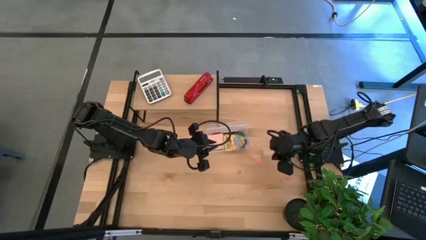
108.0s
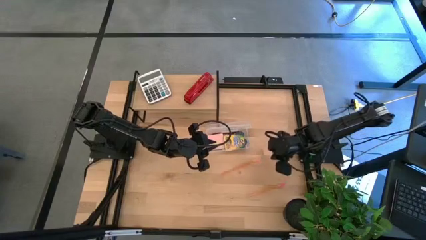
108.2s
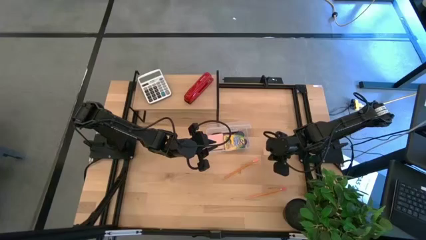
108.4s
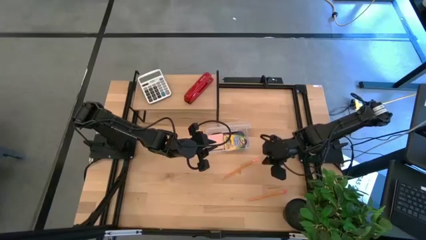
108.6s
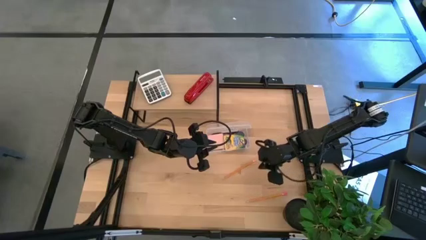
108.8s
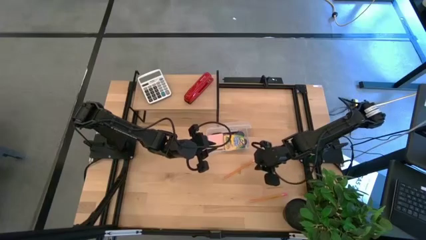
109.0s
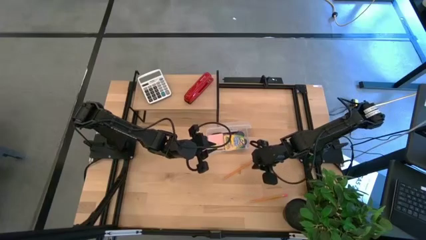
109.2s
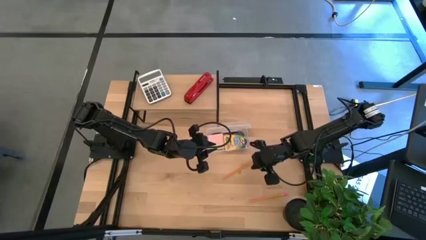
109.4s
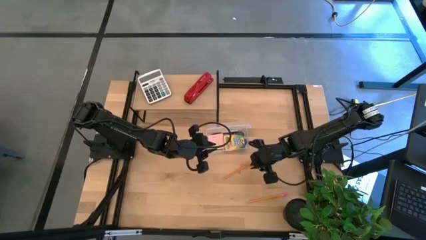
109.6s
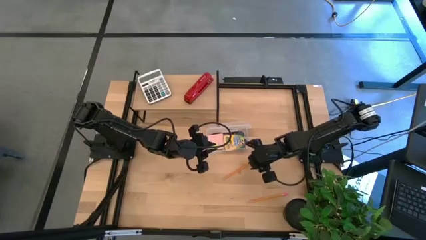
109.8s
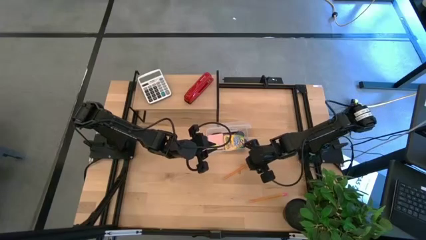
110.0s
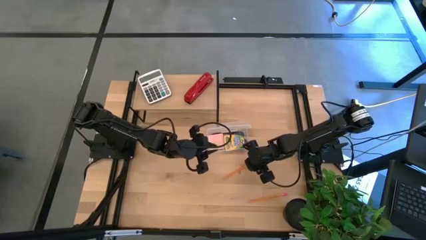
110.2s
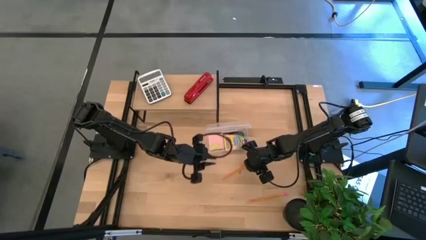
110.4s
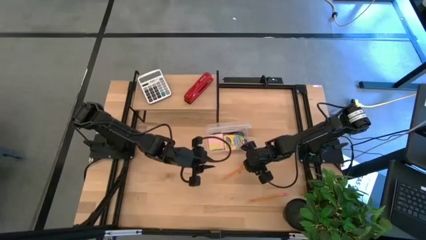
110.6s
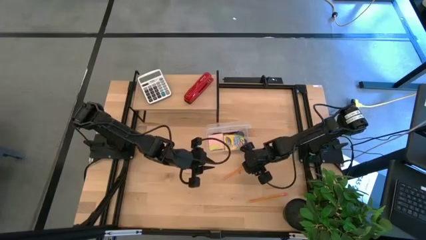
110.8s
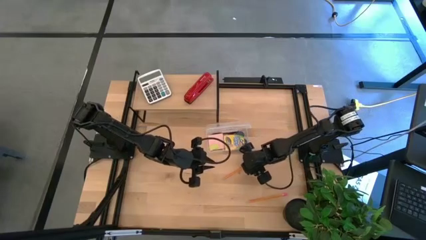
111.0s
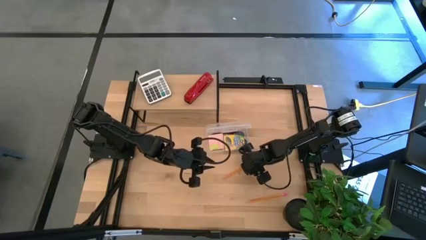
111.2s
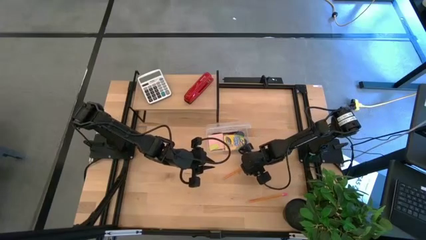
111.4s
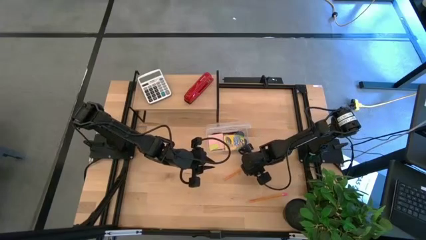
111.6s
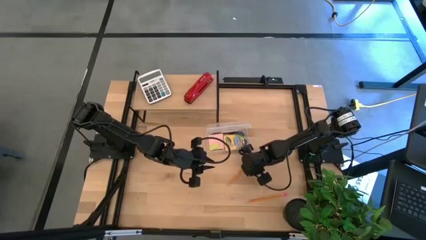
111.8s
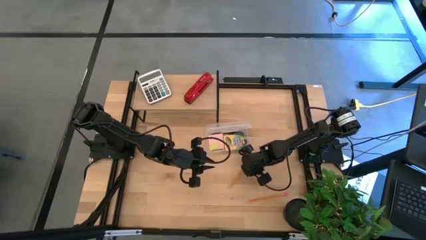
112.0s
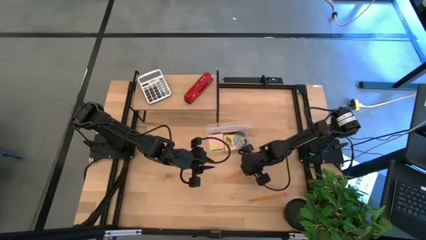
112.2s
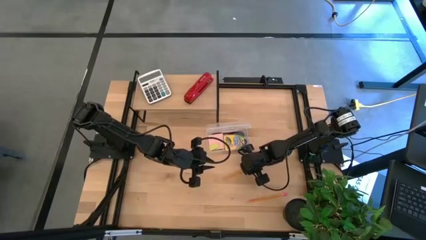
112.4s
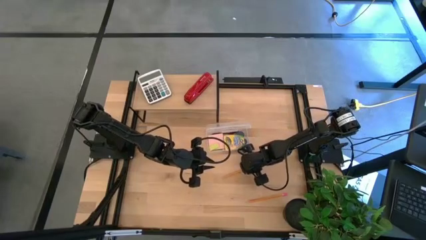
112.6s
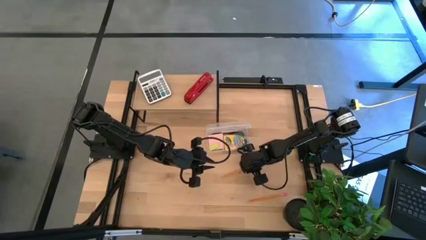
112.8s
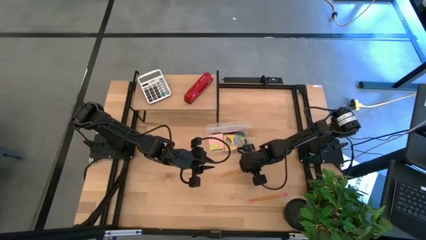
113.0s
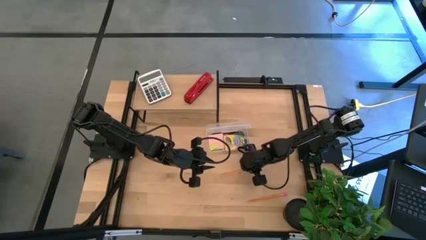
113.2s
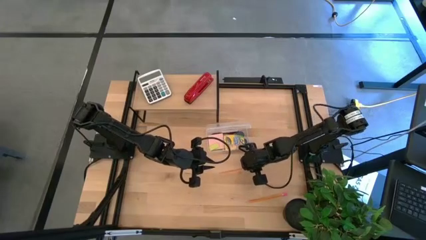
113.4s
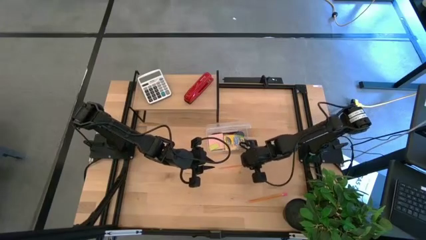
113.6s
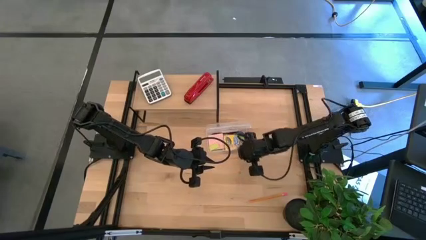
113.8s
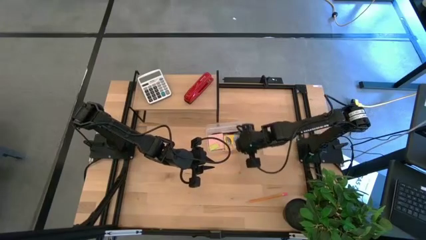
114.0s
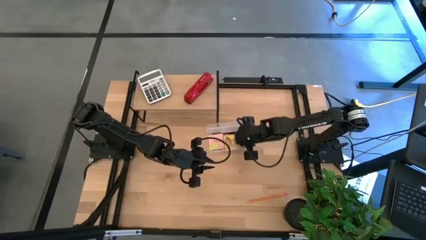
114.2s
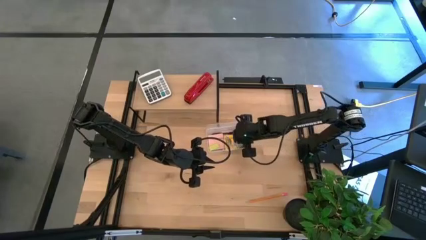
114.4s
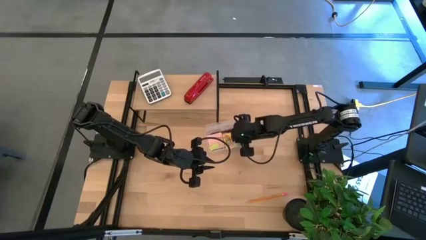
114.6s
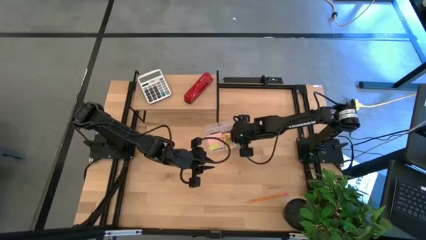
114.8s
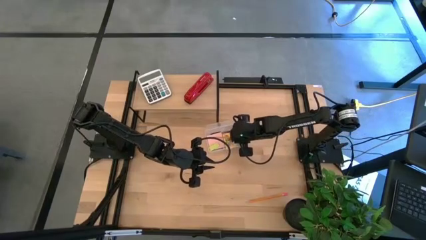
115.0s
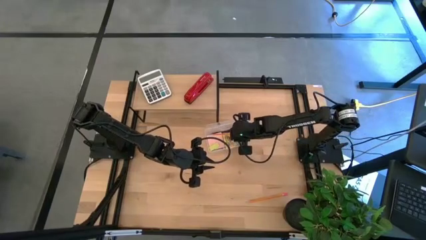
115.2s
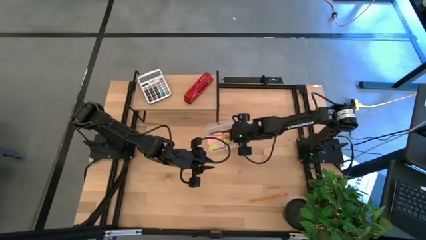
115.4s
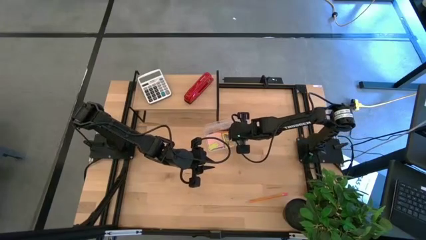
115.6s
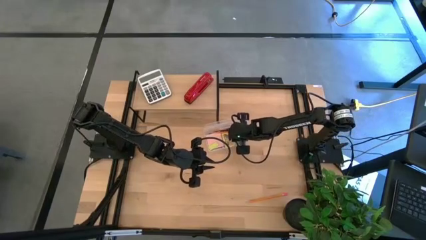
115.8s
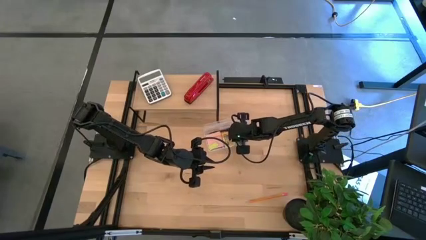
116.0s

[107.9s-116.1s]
Task: Pack school essentials
Put the top orange pencil into the supply box

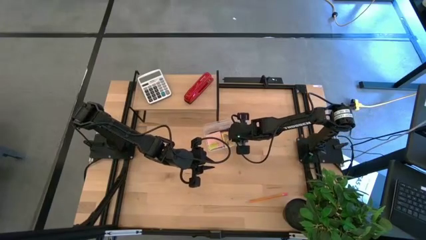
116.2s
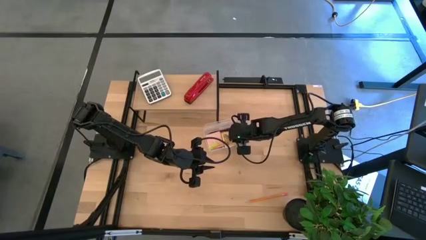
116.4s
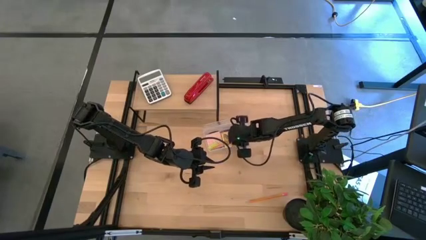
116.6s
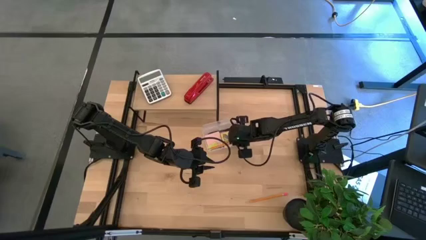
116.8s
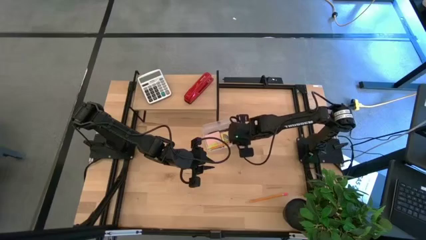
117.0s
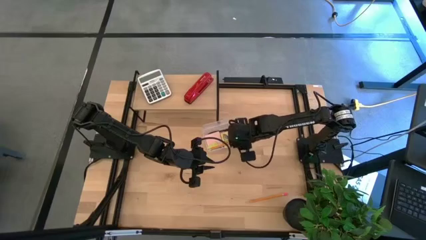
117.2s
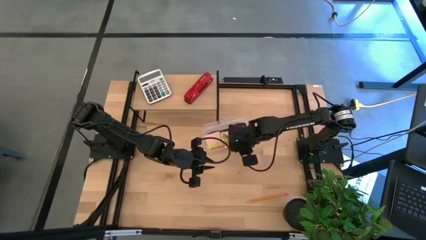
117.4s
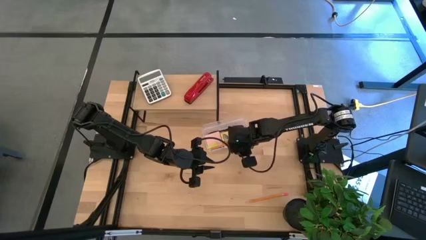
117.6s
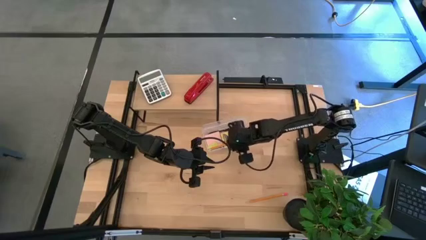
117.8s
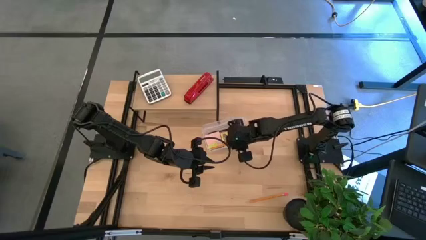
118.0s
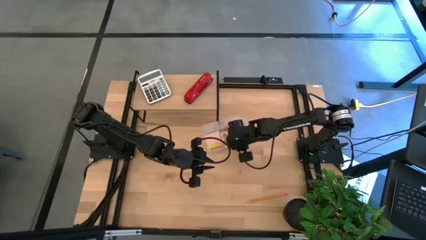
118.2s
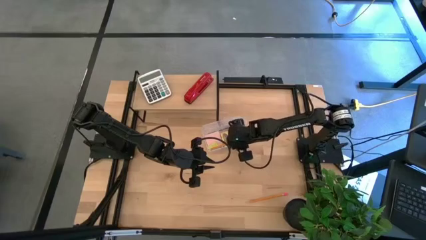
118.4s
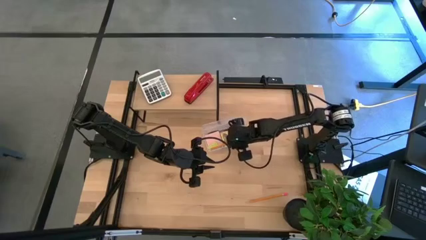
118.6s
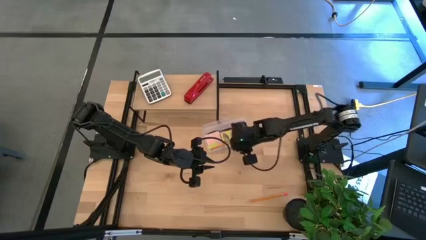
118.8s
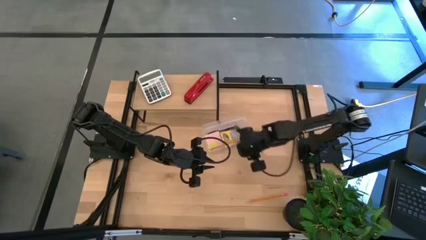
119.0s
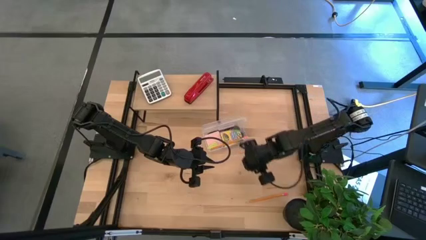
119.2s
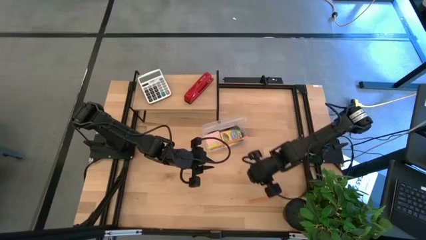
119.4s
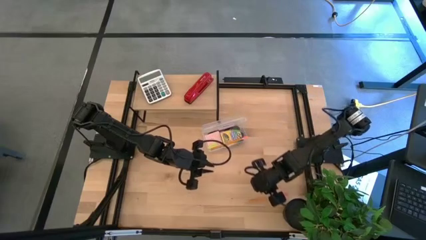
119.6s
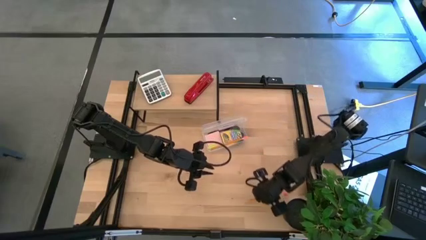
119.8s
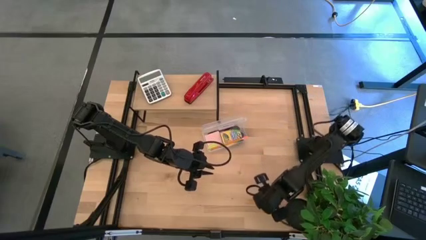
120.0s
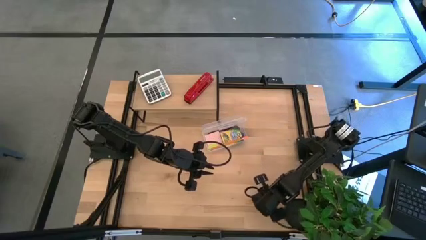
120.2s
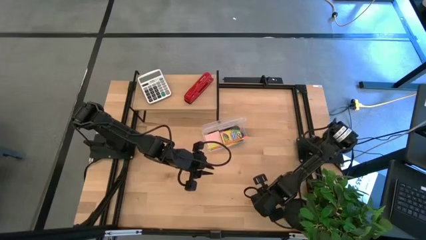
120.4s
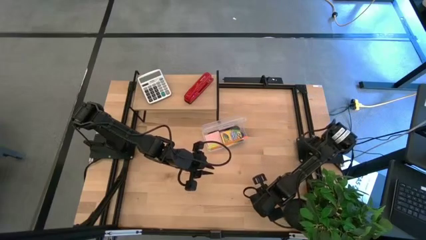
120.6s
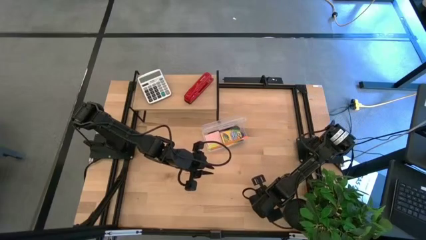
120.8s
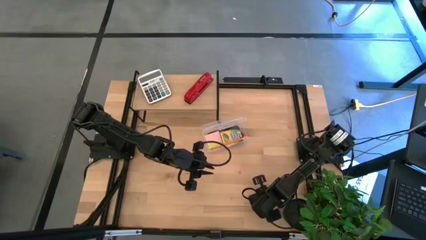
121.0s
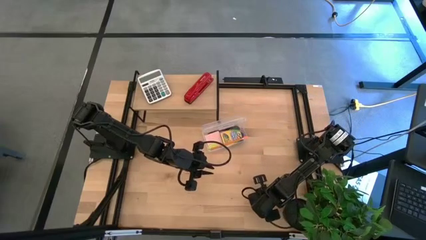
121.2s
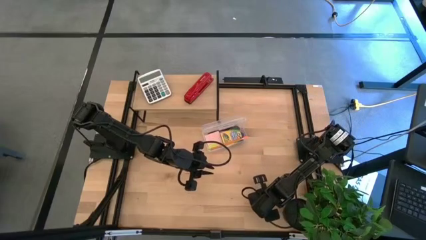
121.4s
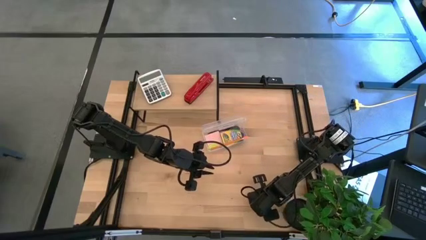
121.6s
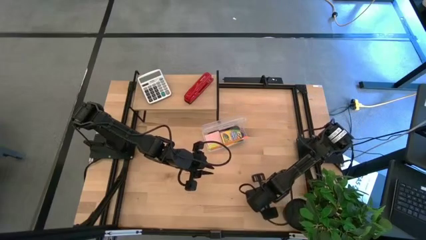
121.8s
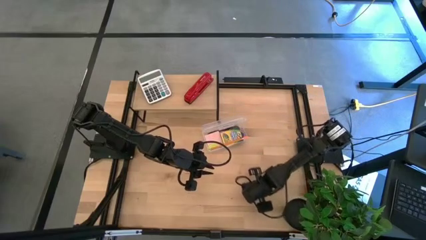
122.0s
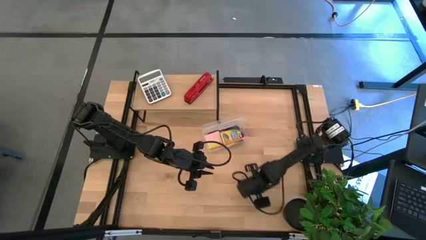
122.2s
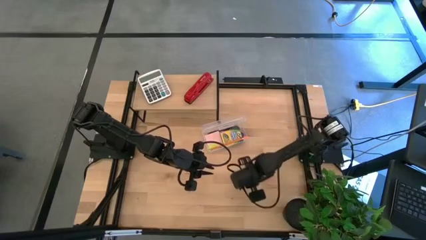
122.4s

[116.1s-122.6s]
Put the orange pencil into the supply box

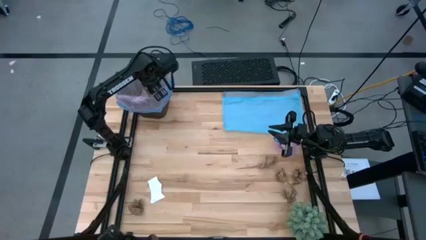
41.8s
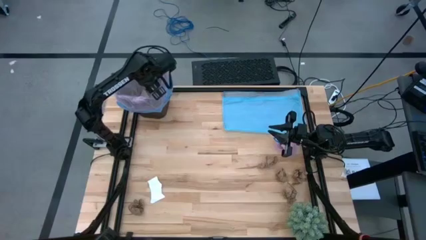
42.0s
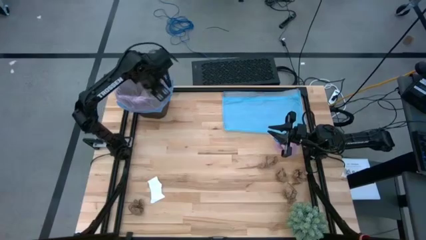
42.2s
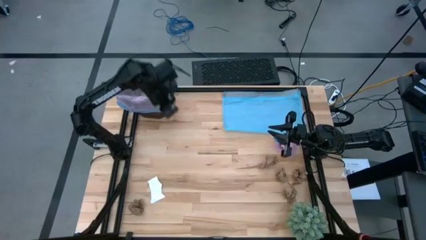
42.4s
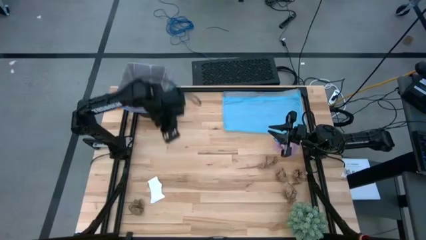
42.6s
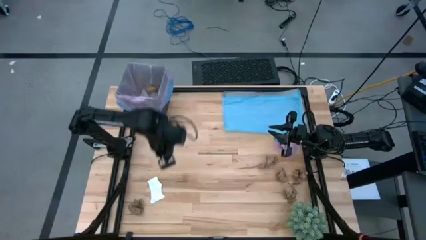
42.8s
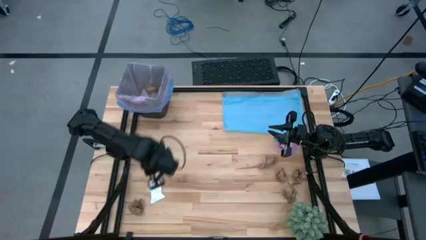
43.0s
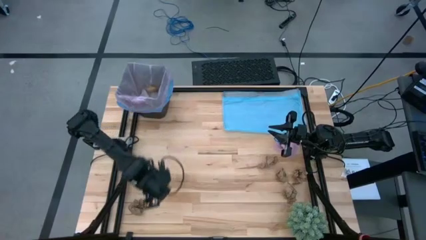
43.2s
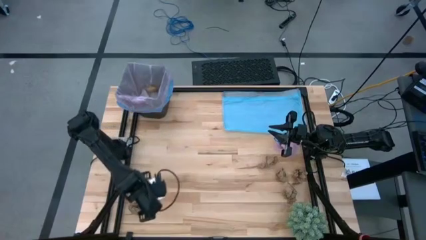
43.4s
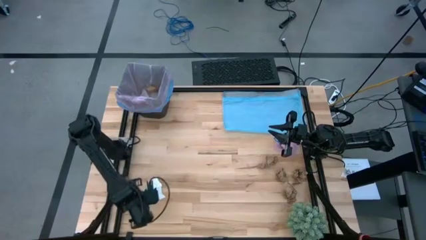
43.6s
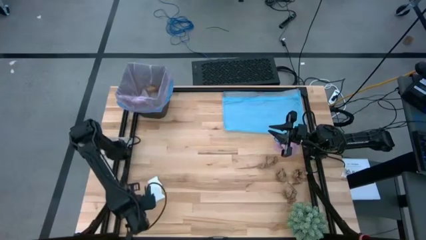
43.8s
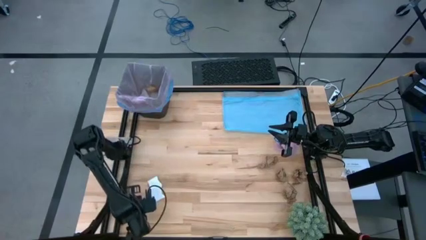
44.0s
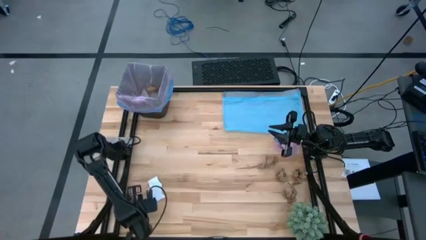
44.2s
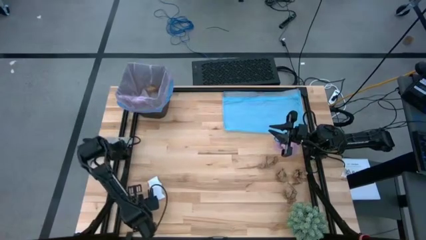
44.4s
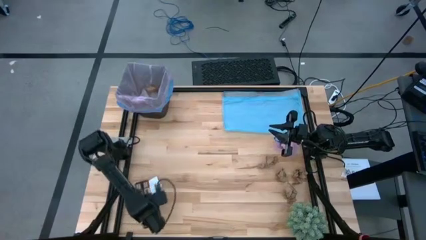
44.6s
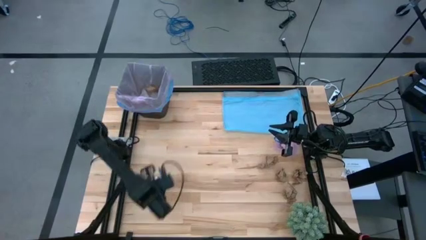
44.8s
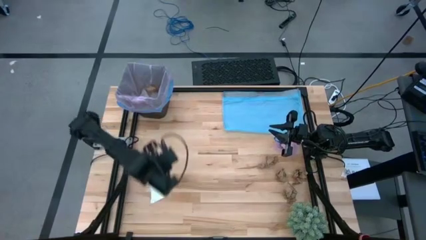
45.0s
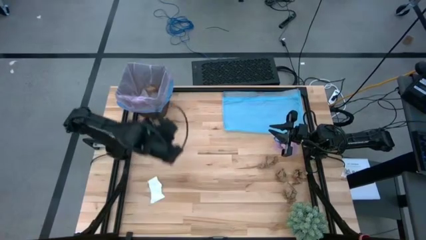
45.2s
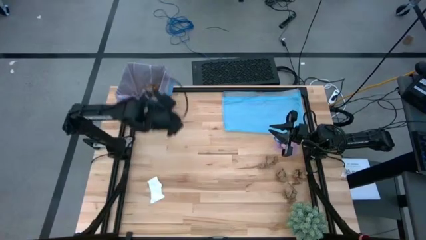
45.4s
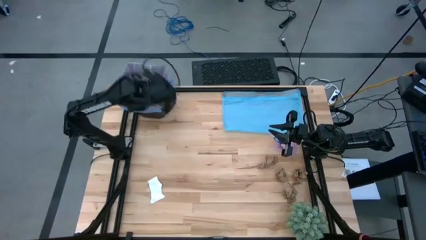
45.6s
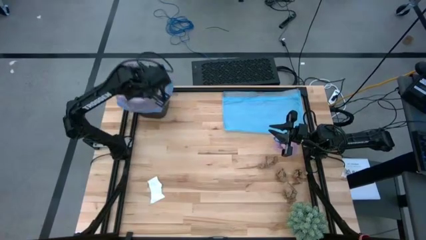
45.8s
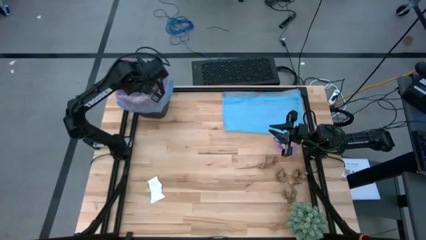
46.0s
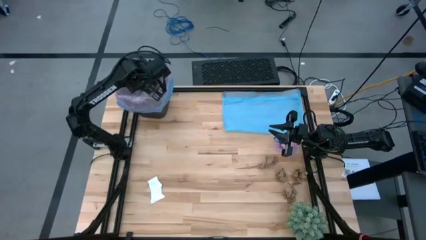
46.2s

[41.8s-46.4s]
Task: place trash/remove bag and relplace
Put the brown napkin into the trash bin
